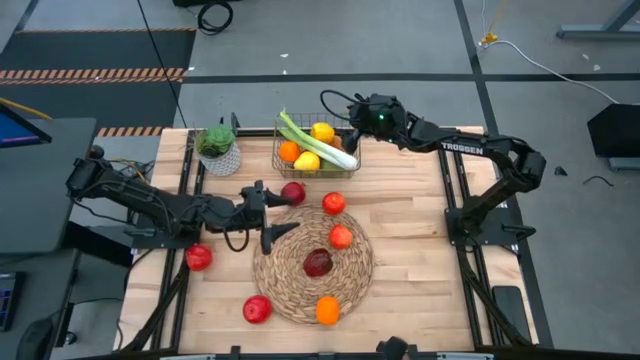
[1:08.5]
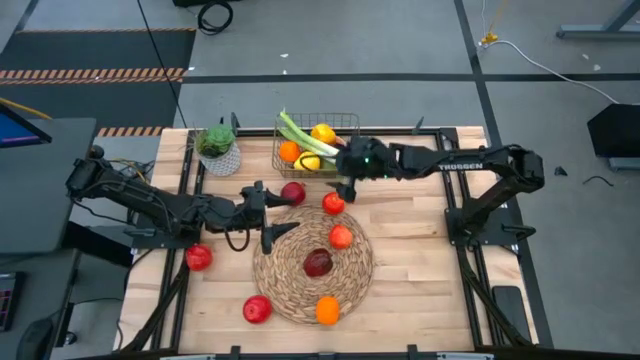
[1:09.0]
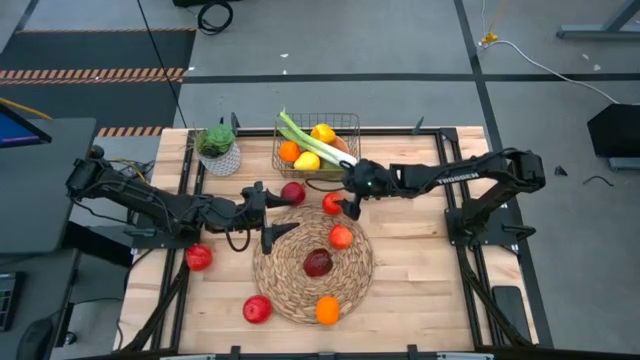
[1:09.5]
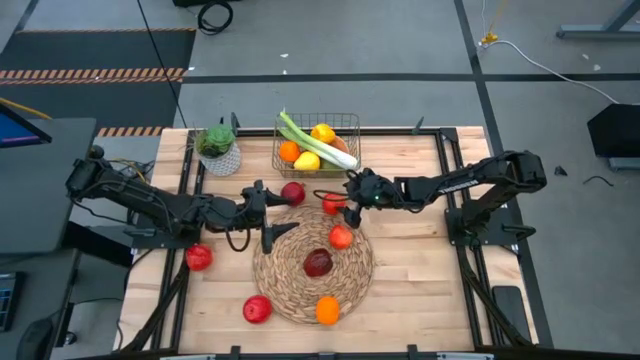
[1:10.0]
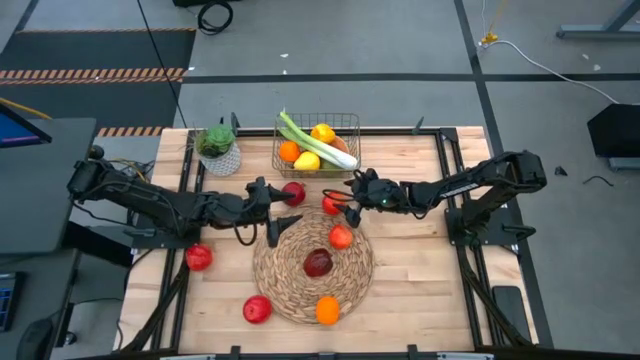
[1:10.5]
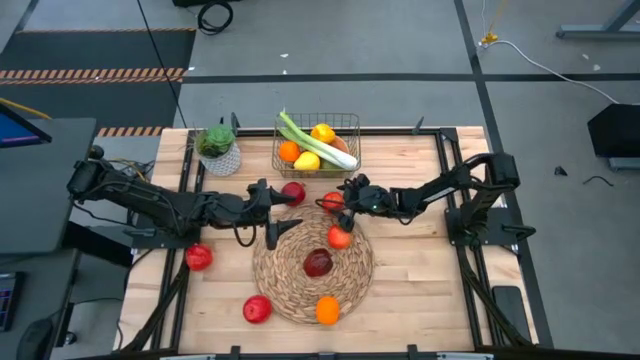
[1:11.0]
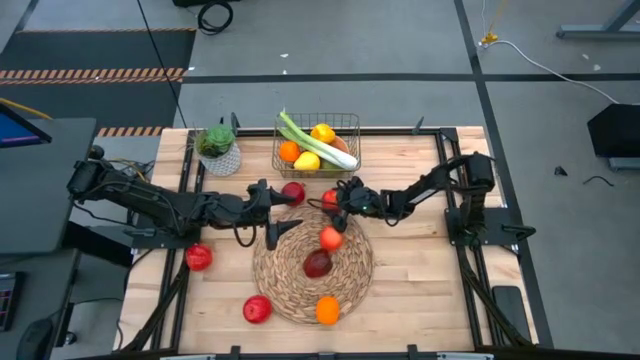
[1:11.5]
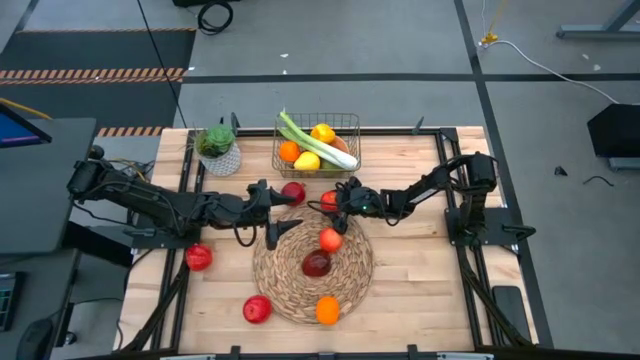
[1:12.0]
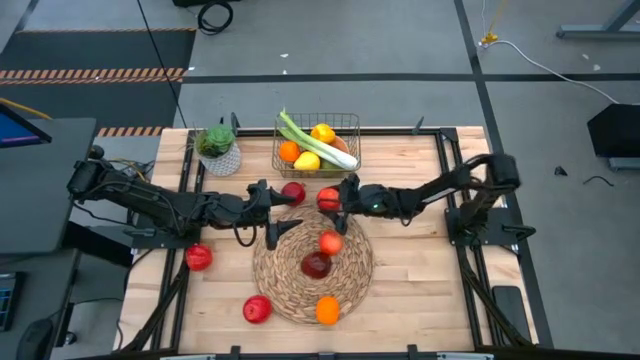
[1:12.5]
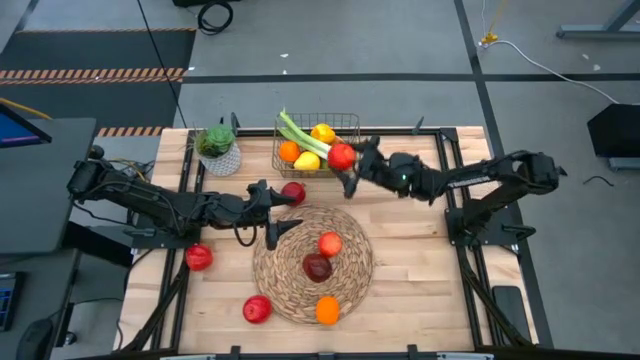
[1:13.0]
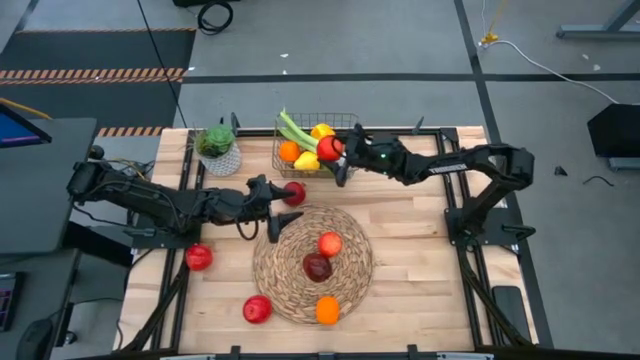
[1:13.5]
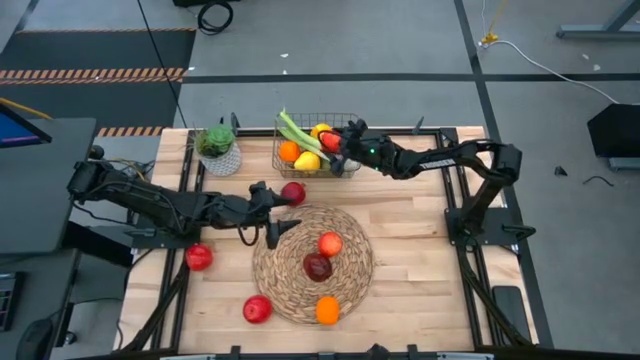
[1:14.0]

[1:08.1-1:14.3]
Task: Build produce basket
Put the apple into the wire basket

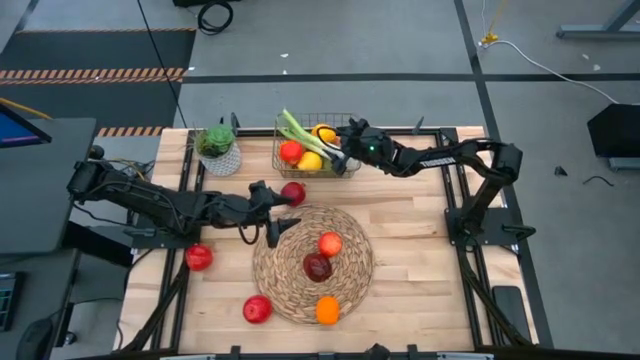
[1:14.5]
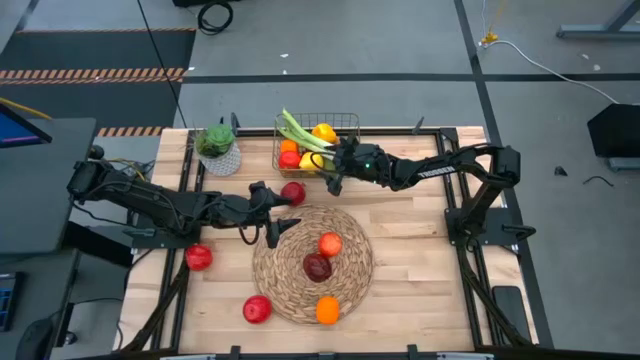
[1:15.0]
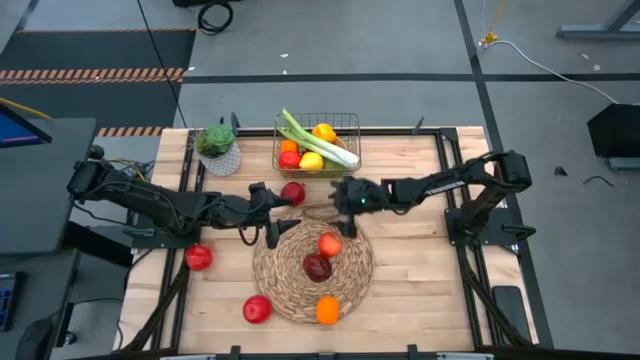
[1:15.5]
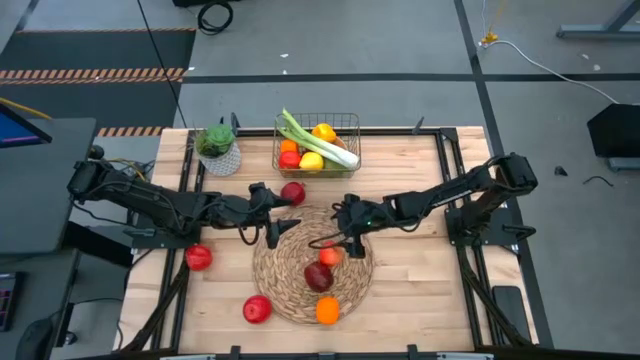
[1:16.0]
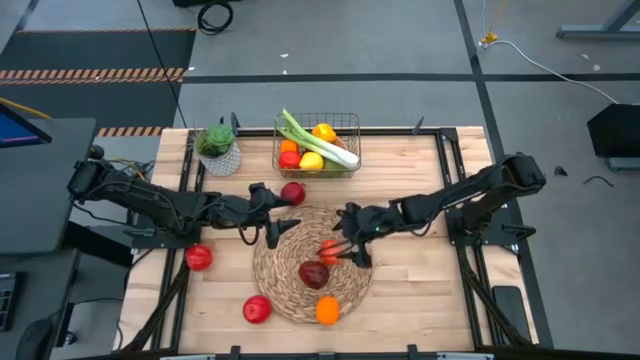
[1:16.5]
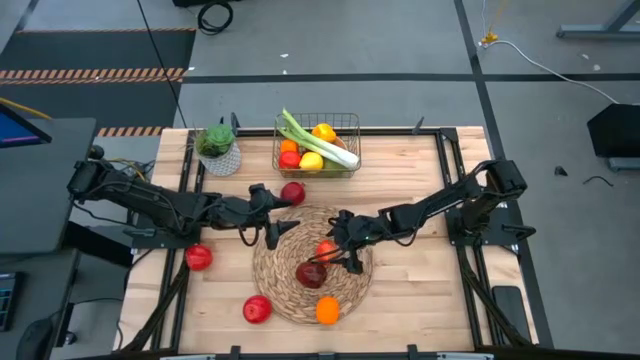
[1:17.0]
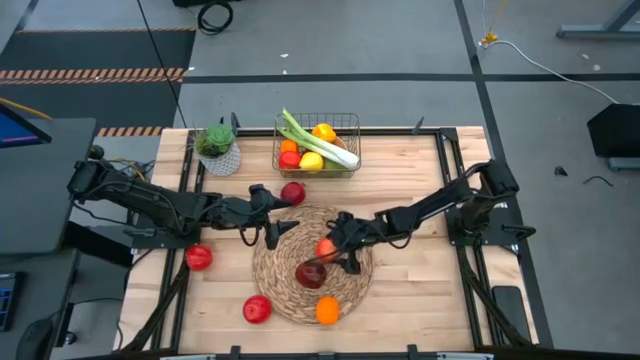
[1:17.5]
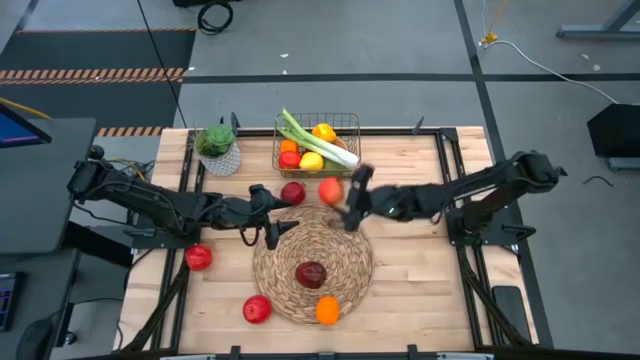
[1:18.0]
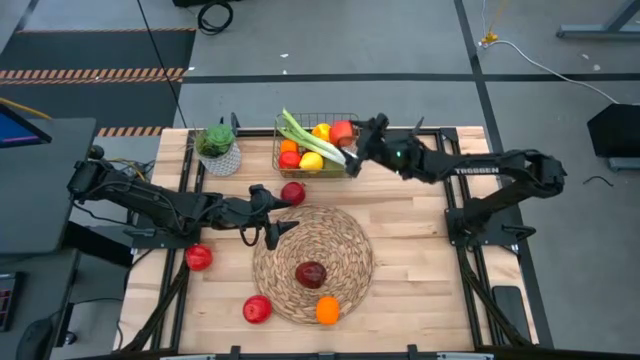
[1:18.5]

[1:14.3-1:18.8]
Put the apple into the wire basket

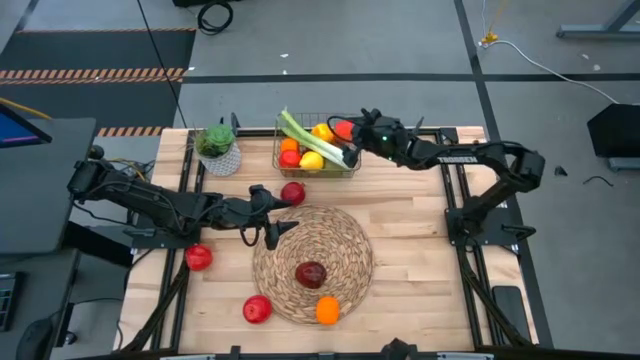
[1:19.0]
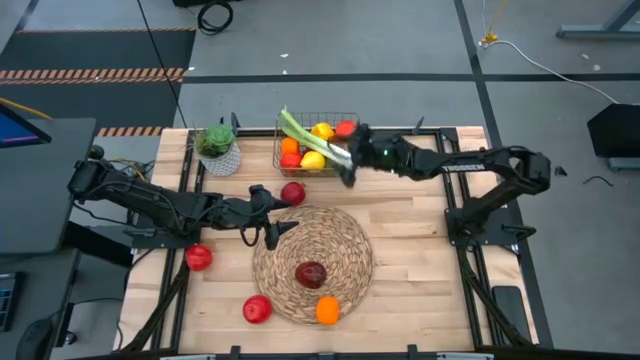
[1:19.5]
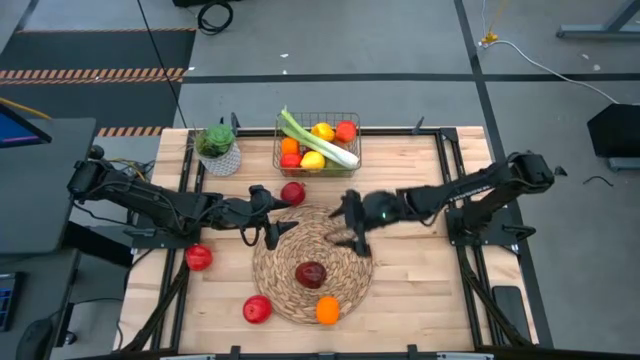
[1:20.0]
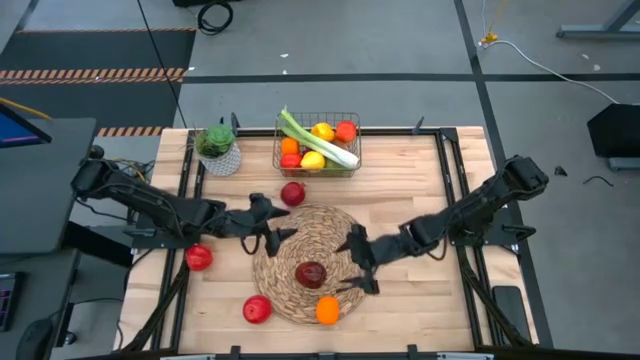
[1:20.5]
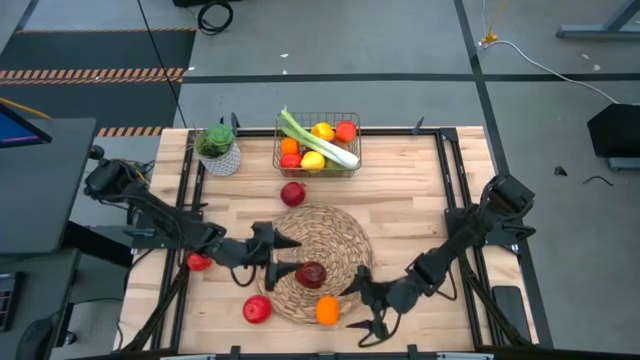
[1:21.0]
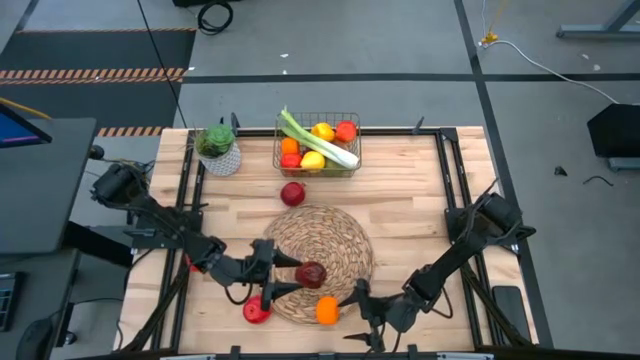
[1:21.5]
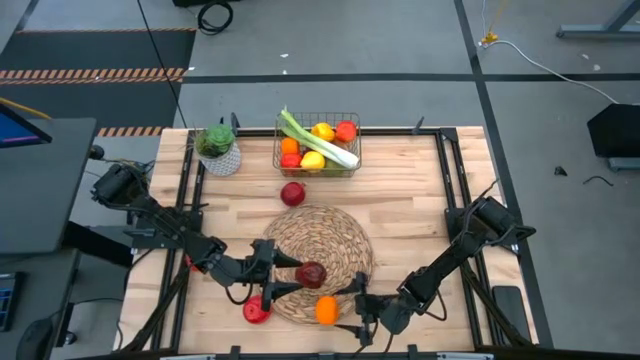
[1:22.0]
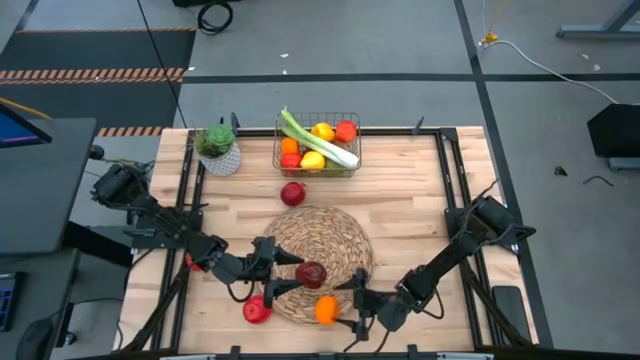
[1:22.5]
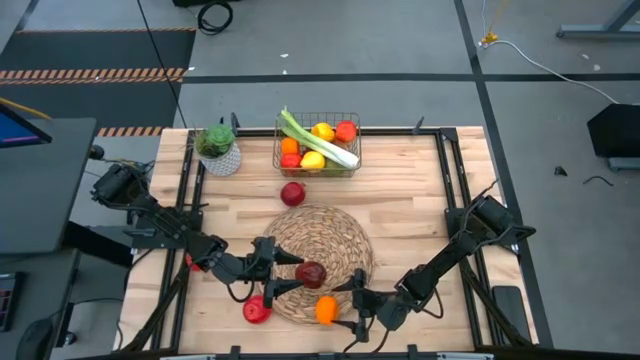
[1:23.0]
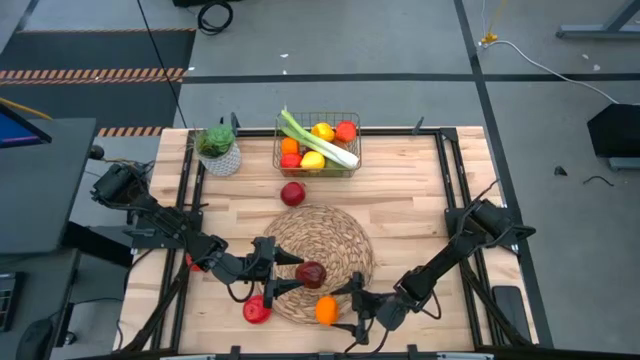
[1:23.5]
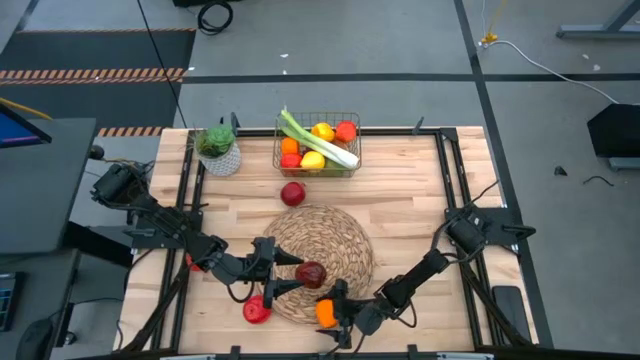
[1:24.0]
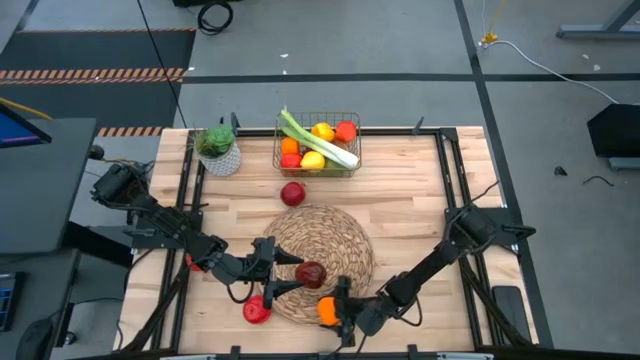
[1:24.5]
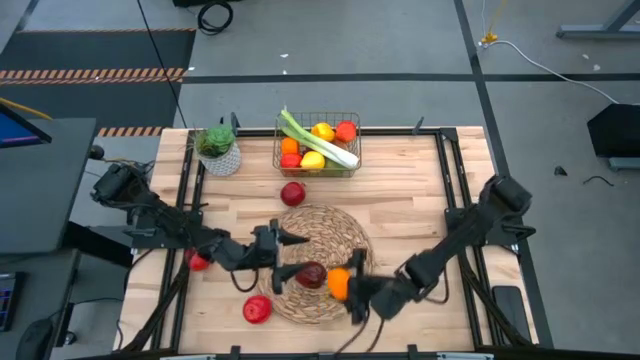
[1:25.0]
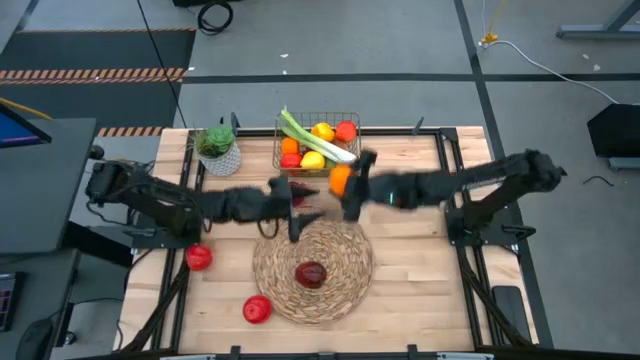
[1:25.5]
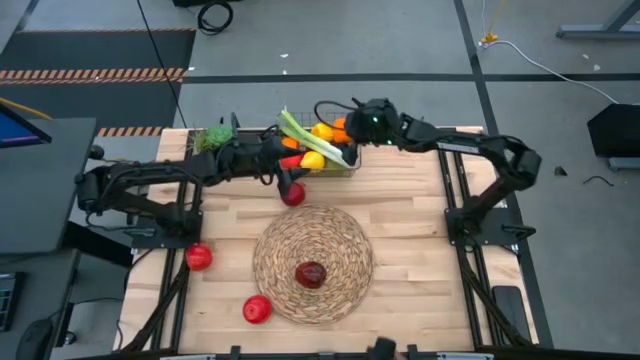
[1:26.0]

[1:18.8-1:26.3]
Put the orange into the wire basket

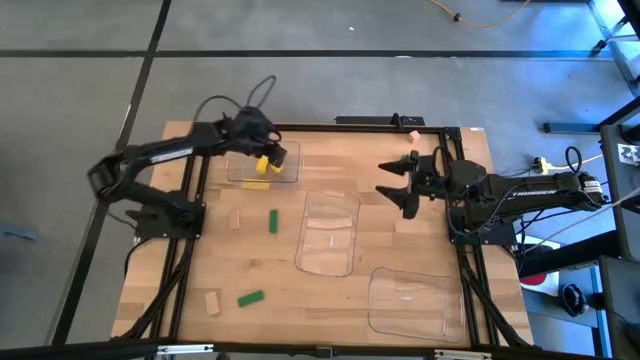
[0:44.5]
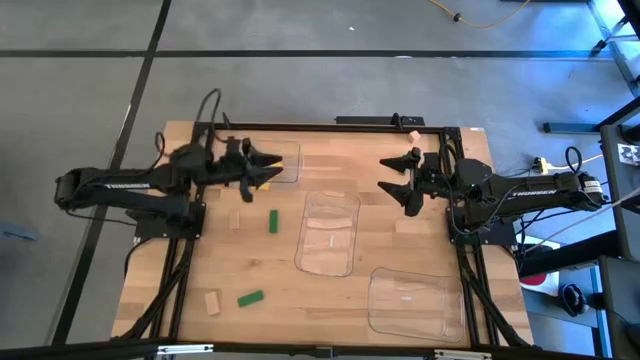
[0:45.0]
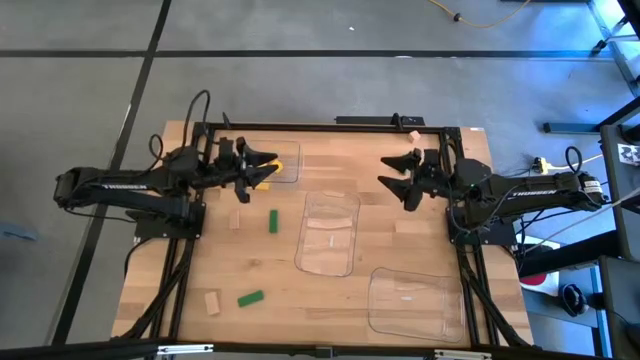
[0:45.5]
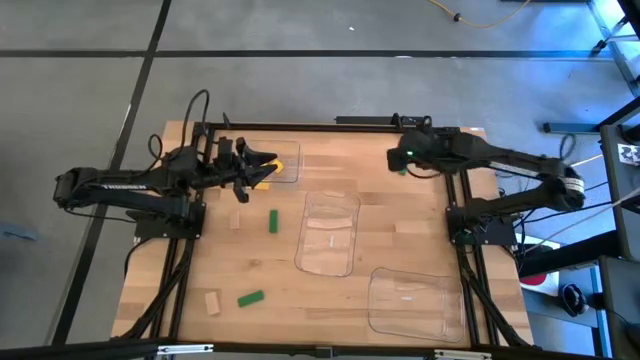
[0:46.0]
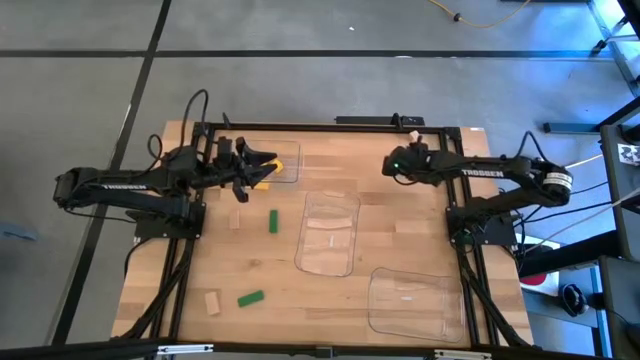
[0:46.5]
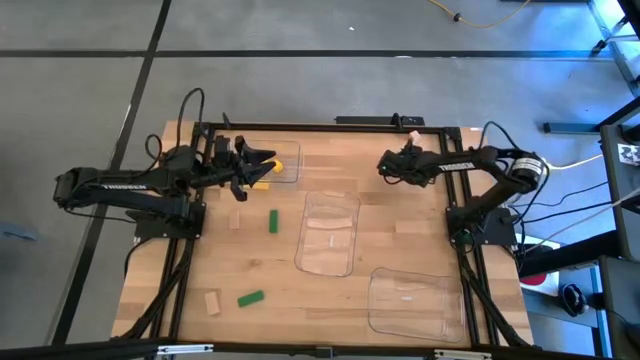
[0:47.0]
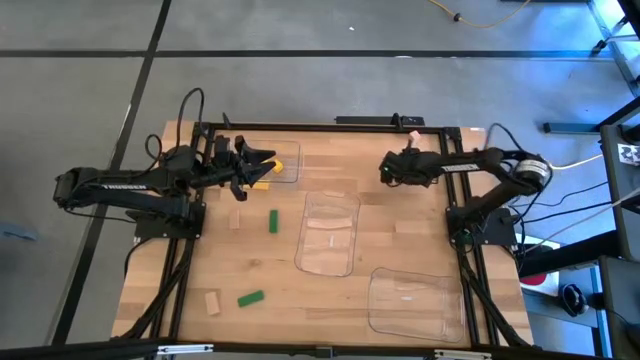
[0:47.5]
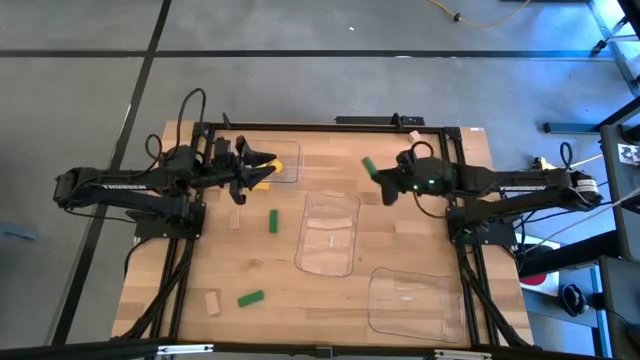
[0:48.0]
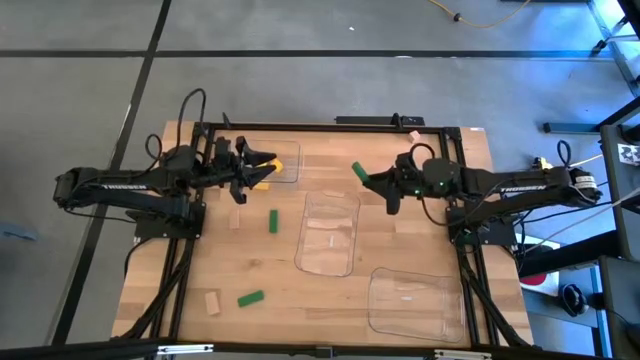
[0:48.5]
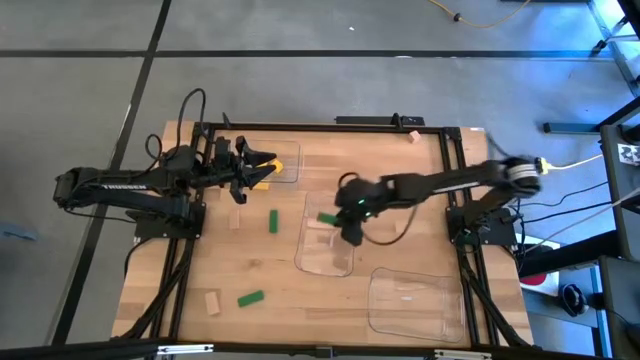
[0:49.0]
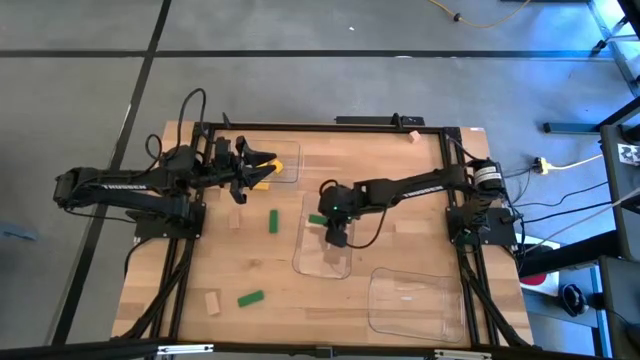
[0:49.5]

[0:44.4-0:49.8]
Task: Sort & place blocks by color
Put the top right green block into the middle transparent bin
